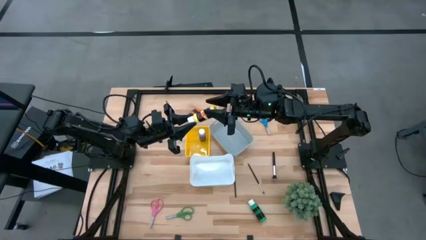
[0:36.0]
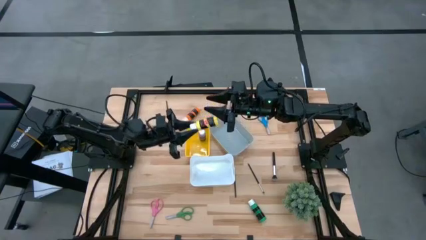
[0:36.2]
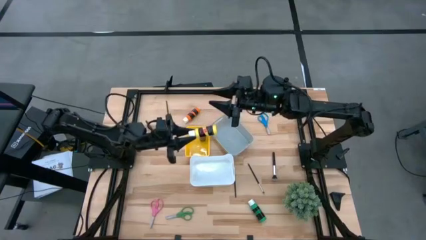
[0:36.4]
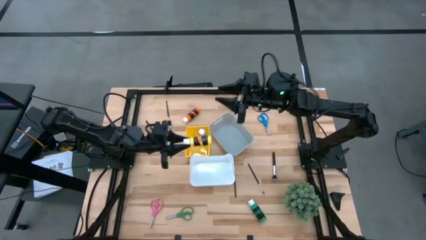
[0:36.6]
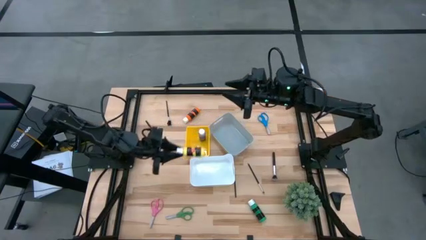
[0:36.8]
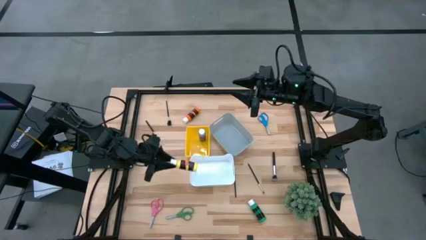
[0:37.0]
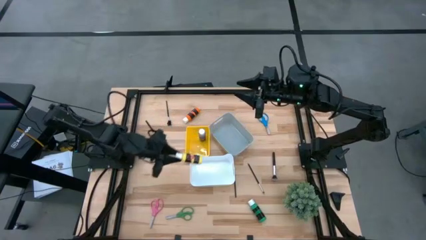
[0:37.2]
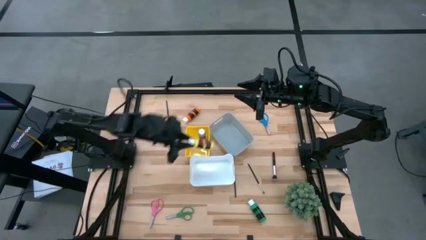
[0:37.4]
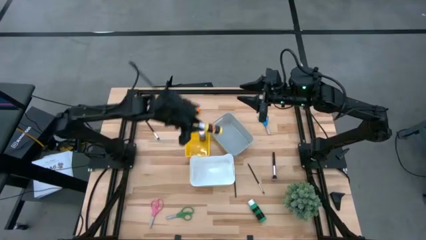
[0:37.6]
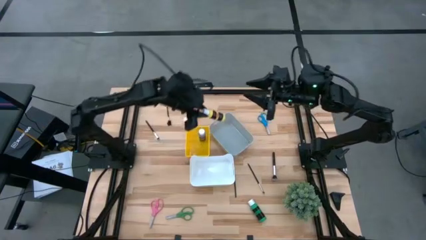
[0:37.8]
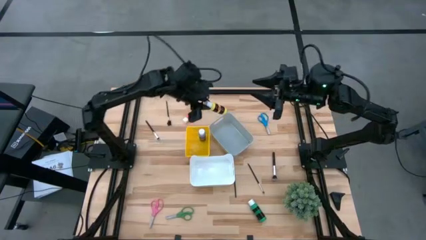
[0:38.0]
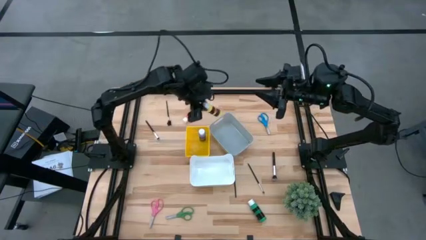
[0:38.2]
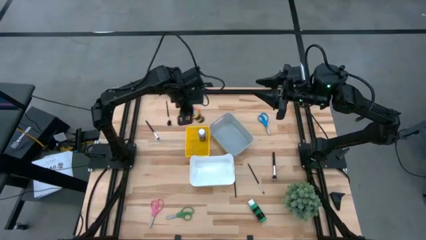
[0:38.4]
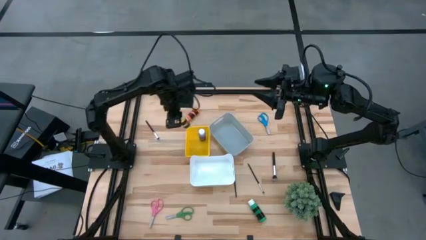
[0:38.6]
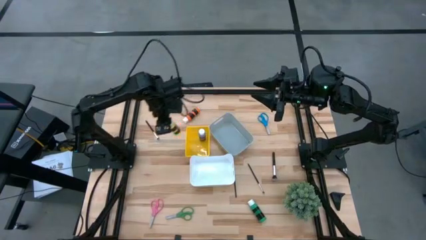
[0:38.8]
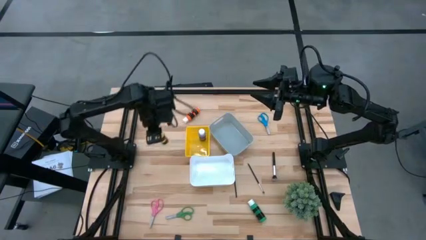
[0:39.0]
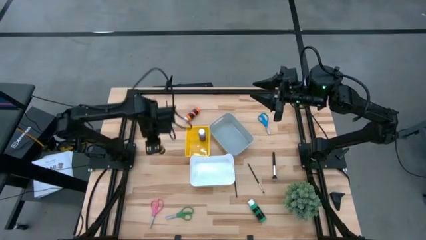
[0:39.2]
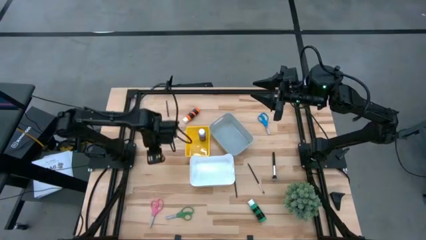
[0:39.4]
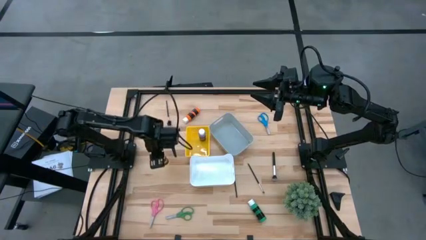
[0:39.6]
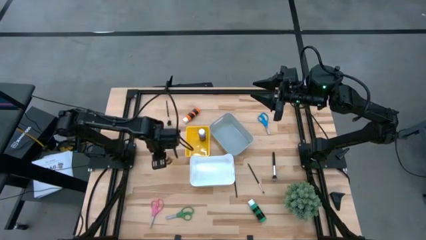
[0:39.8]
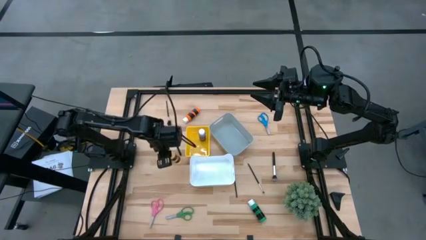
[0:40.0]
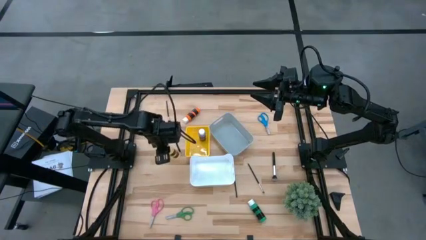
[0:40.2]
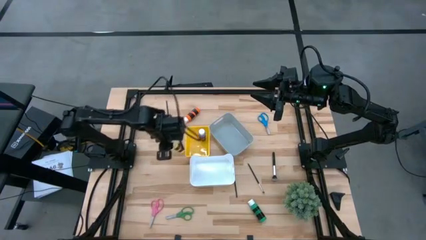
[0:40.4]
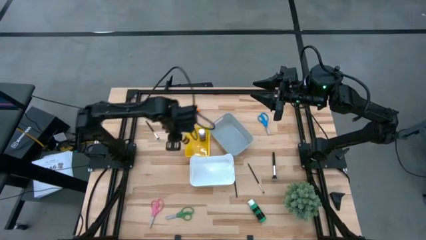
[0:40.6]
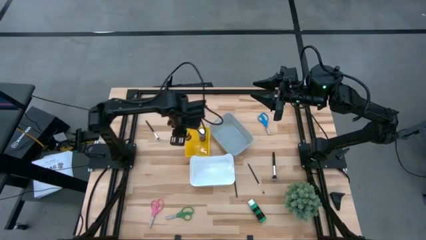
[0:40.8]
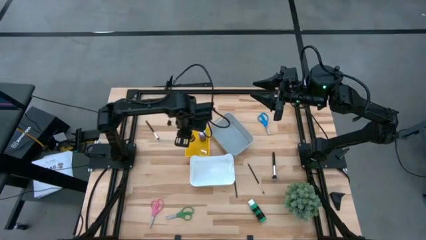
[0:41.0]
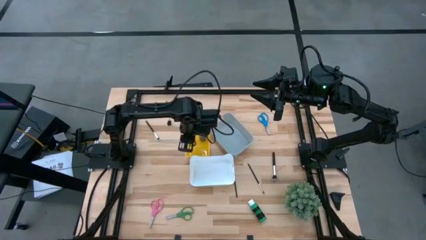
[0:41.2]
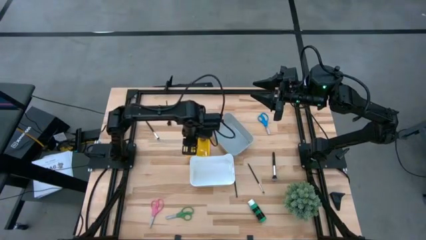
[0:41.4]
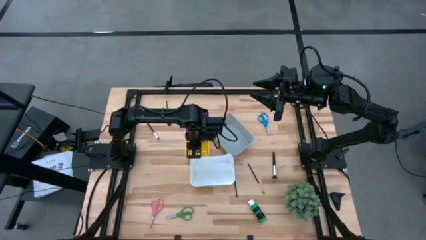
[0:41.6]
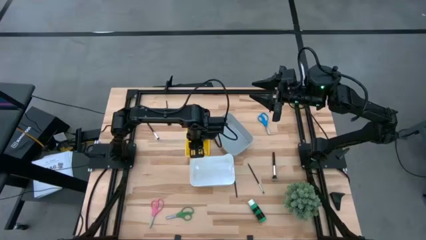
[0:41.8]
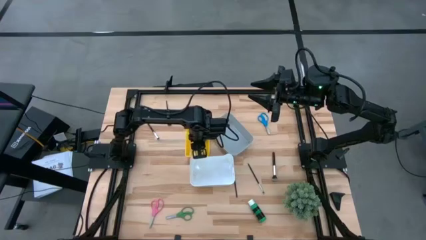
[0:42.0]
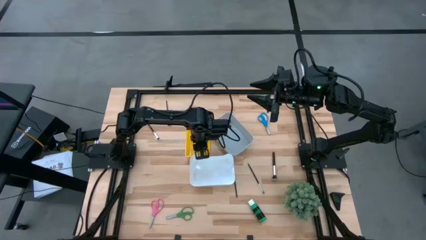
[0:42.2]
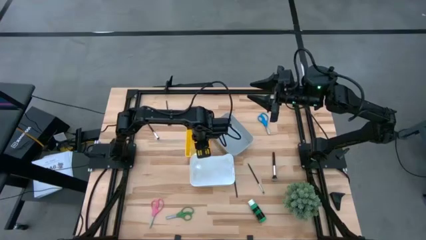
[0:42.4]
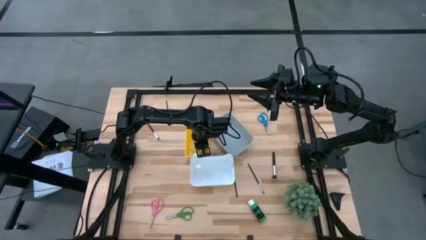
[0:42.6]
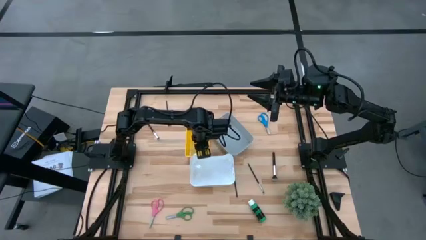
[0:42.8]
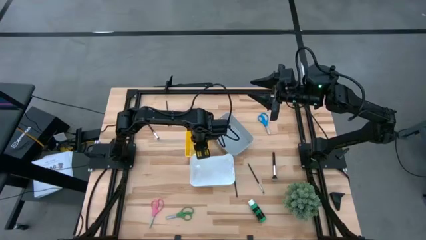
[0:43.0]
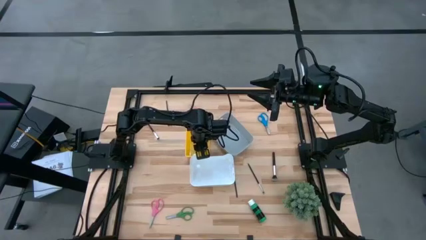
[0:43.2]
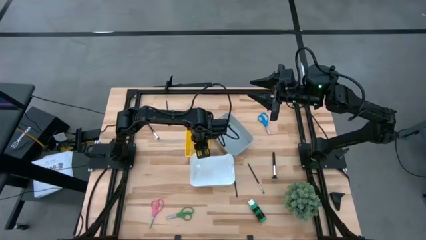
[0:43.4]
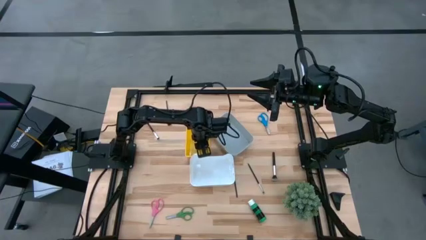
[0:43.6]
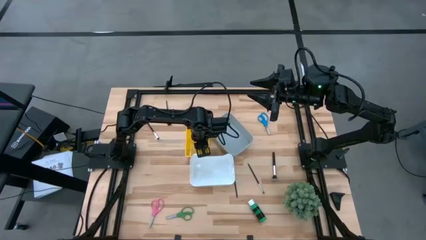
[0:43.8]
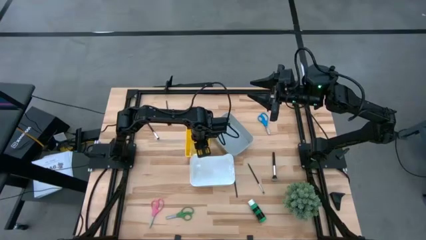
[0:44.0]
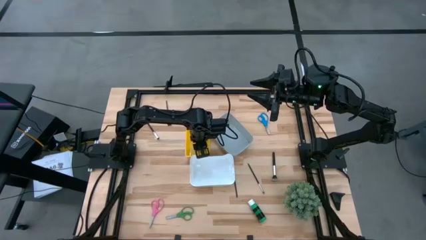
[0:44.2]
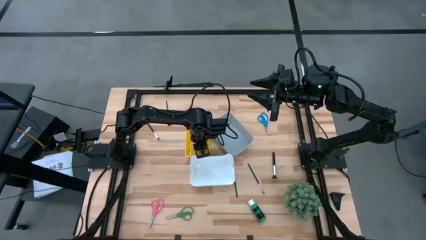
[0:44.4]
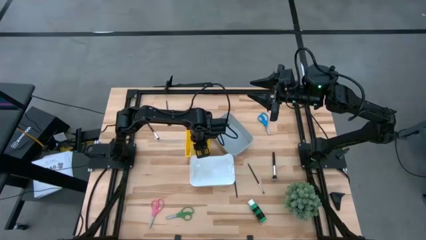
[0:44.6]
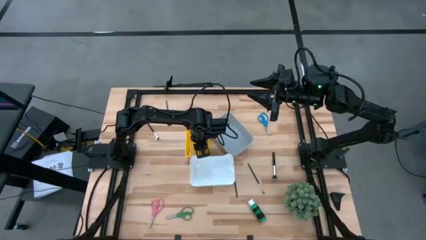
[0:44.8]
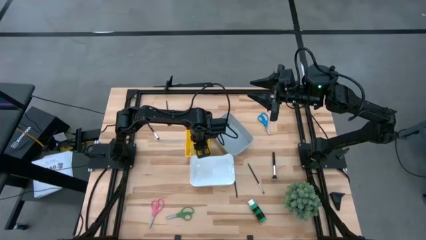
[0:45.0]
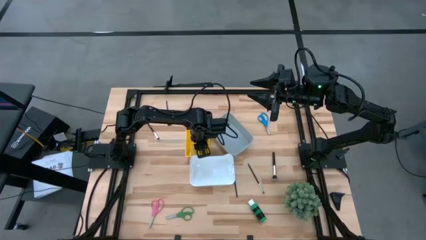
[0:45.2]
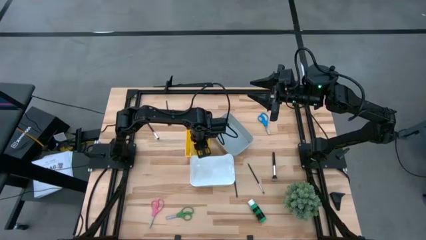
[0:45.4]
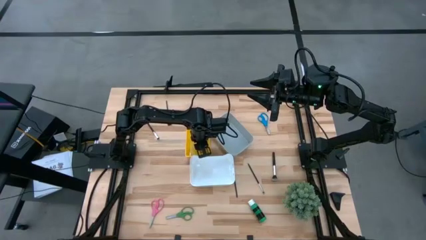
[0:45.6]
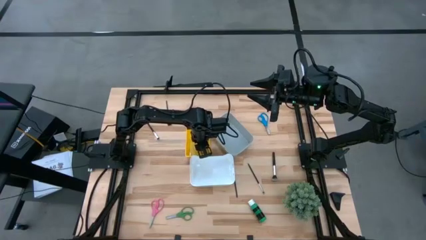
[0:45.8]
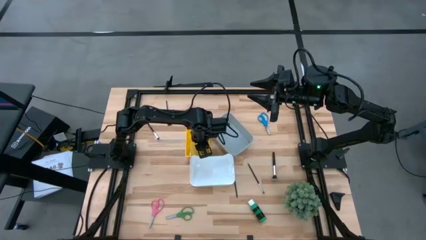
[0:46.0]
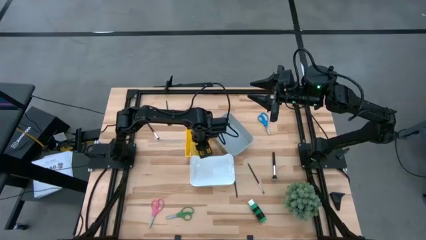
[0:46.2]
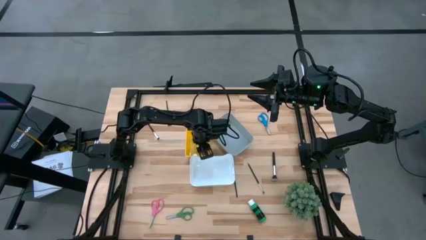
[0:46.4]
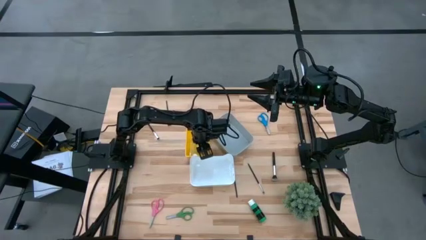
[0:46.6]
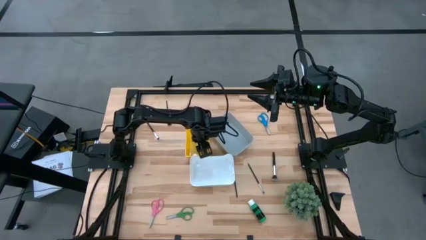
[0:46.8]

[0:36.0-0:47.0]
Task: Pick & Place Paint Supplies
Put the yellow paint bottle into the yellow bin

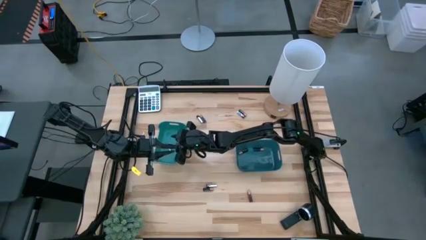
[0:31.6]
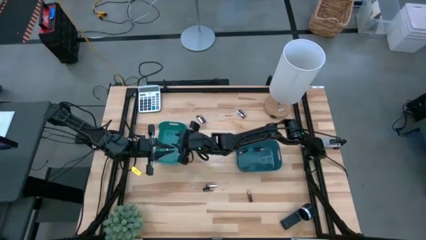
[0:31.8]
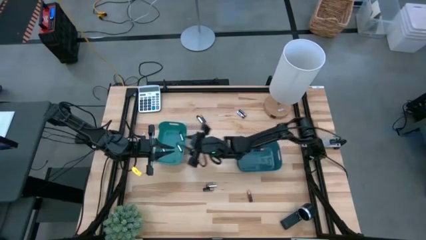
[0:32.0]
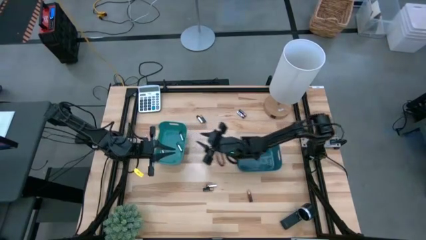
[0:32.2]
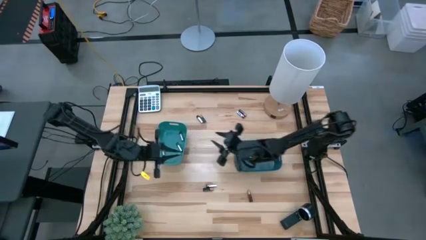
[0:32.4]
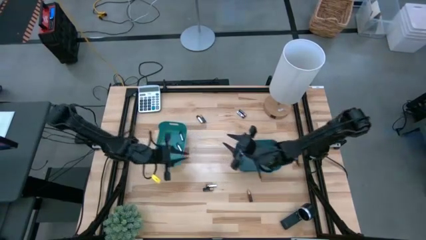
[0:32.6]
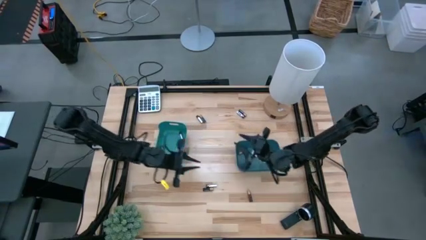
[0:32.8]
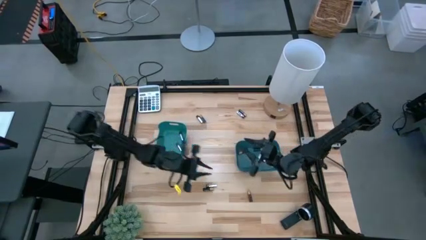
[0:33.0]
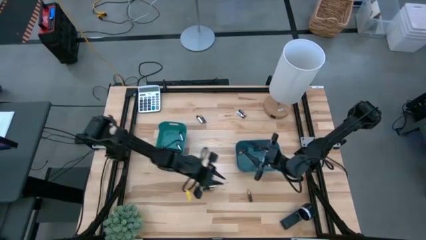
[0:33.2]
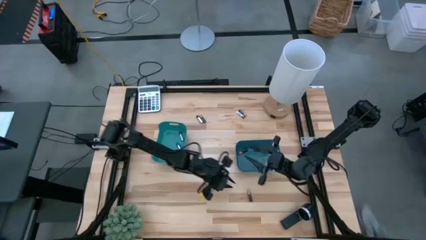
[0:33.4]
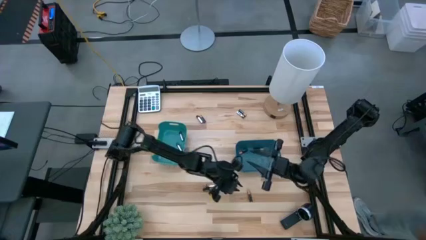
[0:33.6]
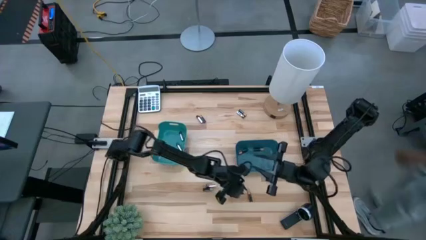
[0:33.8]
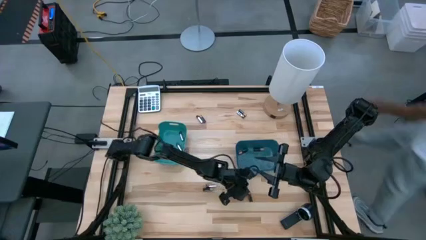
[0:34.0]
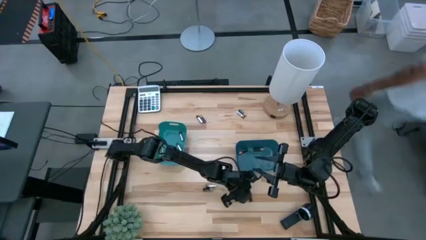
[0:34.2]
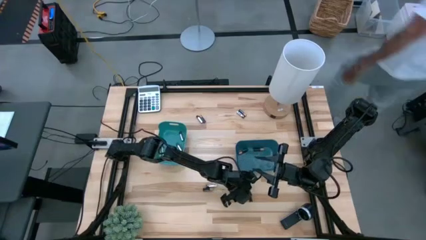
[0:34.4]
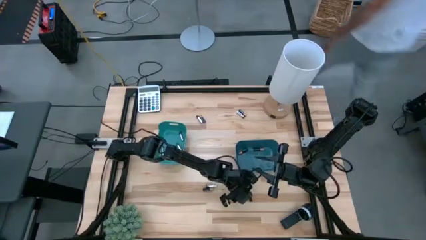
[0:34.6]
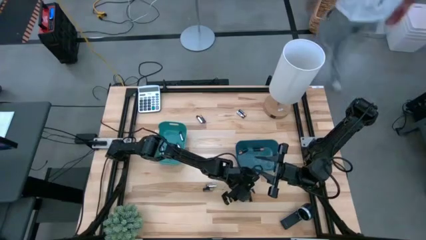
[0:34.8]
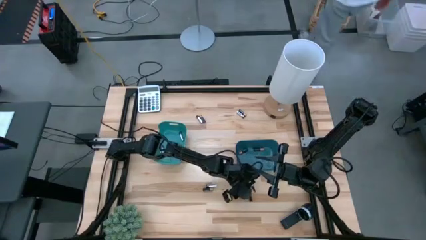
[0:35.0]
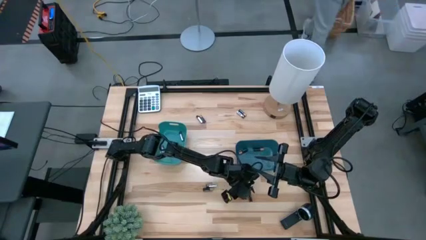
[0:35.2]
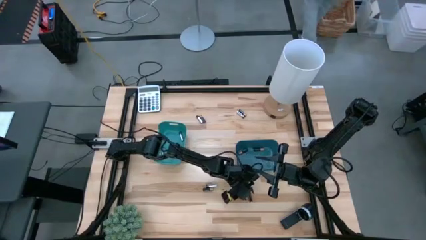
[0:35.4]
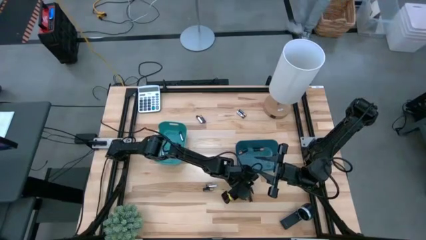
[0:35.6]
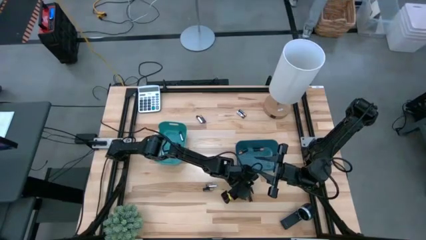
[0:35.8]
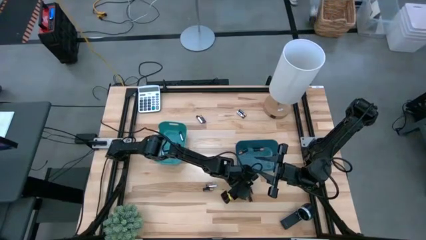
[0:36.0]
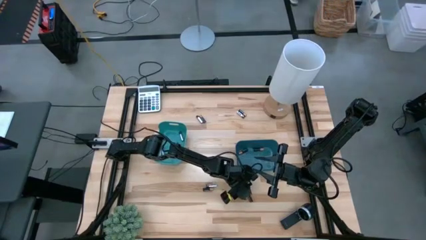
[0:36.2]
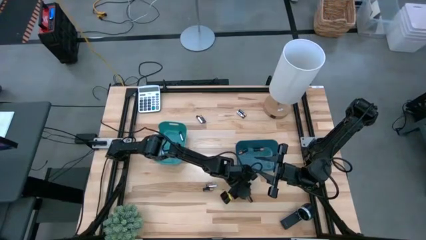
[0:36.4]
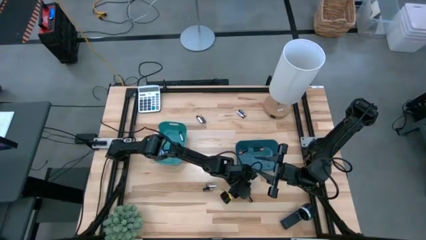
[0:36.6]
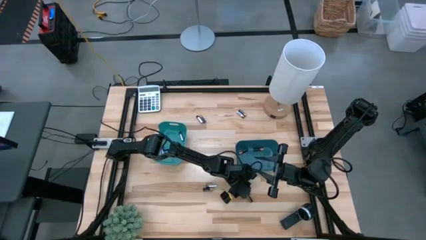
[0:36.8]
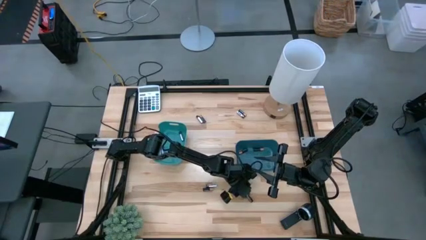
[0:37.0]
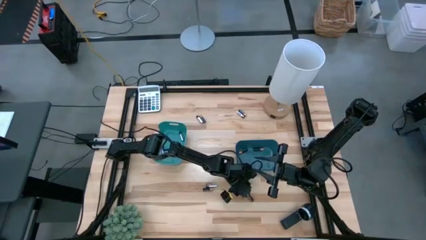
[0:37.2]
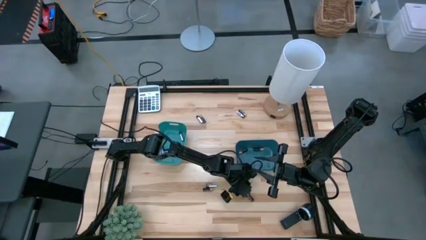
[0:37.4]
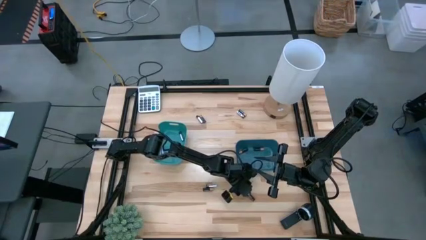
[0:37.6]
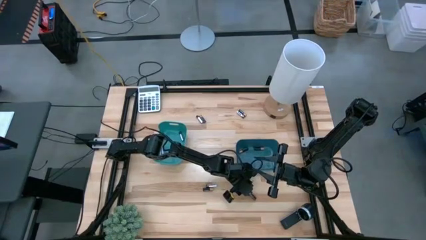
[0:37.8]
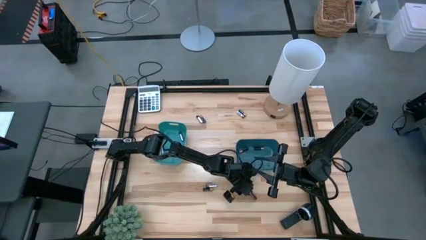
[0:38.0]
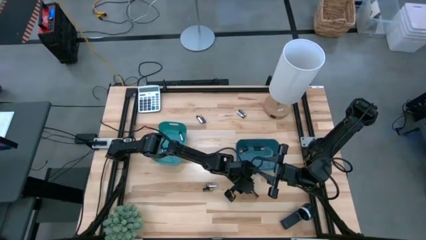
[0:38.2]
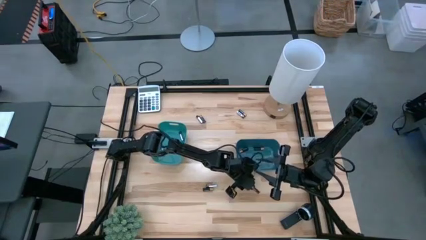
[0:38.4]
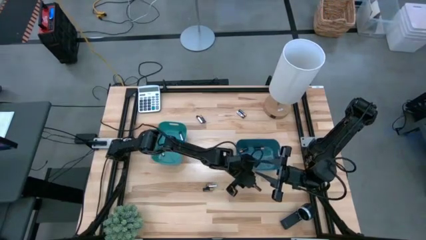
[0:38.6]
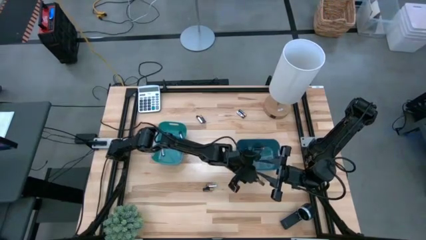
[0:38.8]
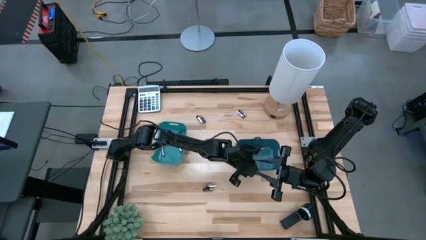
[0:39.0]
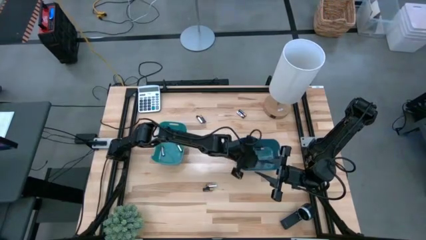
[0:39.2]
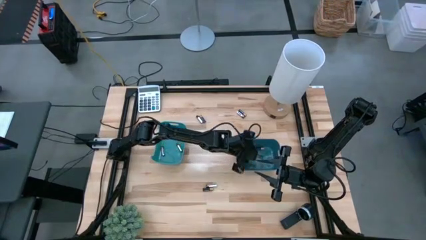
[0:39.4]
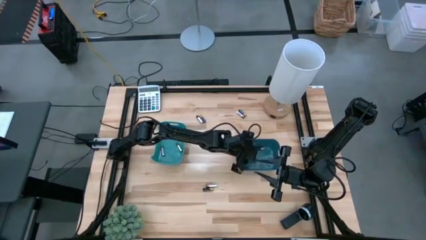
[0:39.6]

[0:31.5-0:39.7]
Task: Sort batteries
Put the black battery into the dark blue bin
